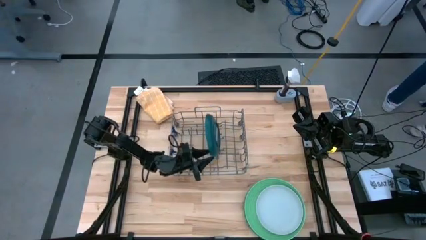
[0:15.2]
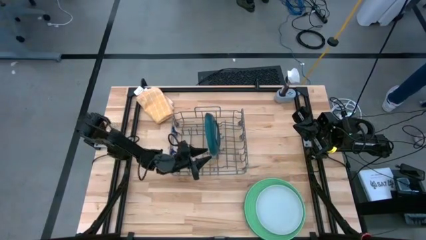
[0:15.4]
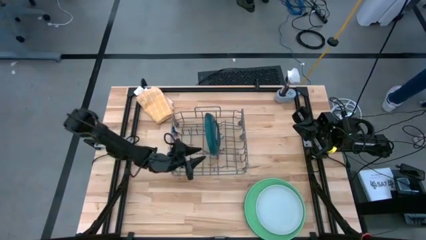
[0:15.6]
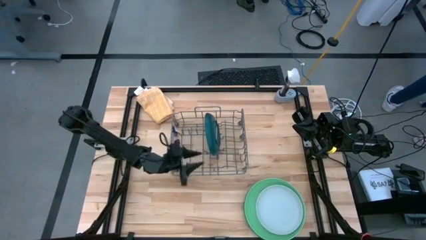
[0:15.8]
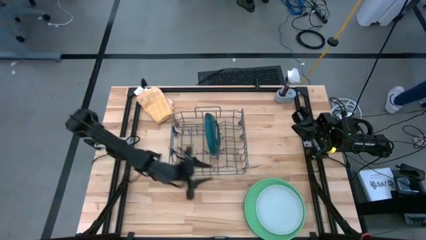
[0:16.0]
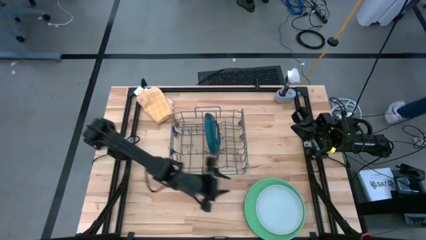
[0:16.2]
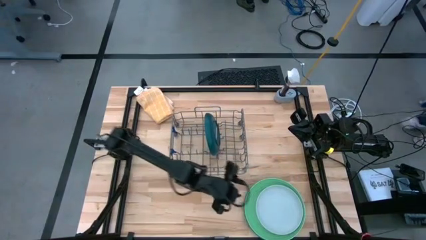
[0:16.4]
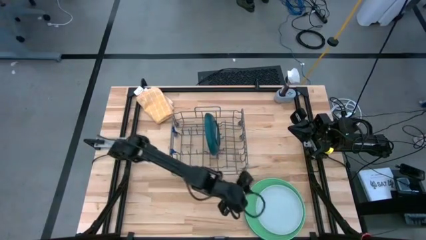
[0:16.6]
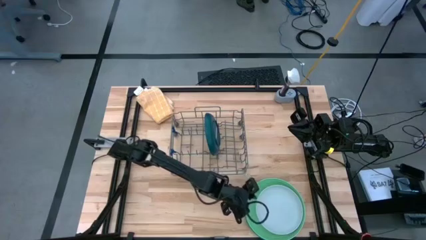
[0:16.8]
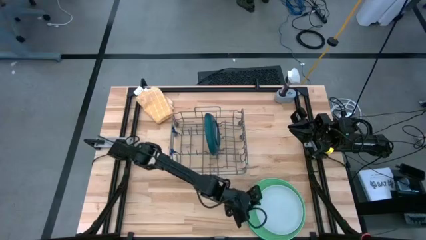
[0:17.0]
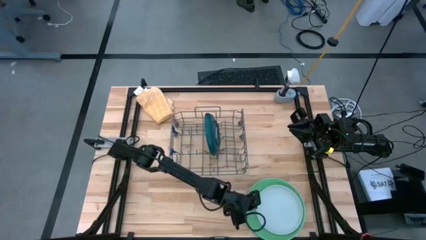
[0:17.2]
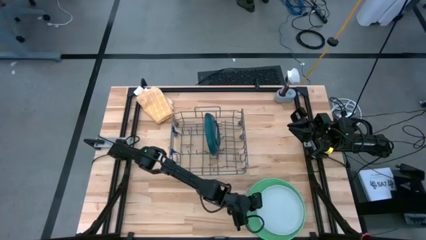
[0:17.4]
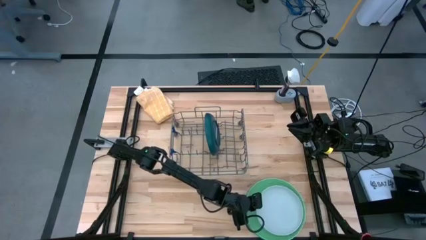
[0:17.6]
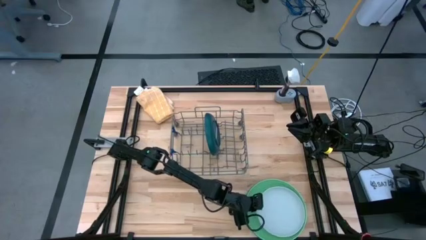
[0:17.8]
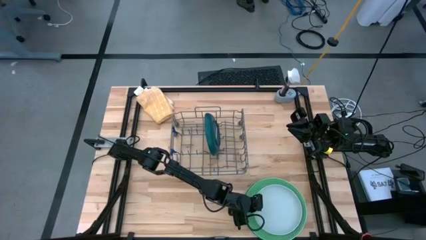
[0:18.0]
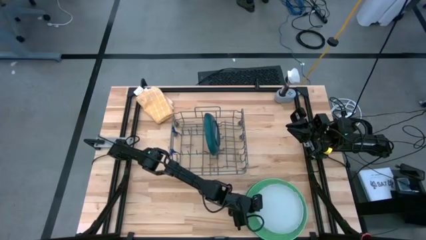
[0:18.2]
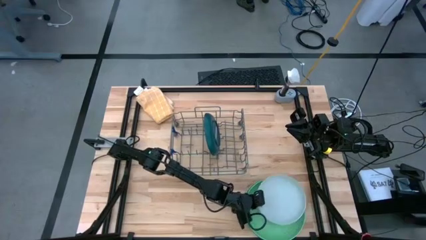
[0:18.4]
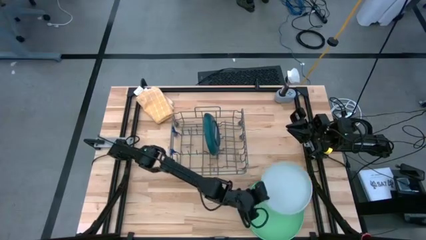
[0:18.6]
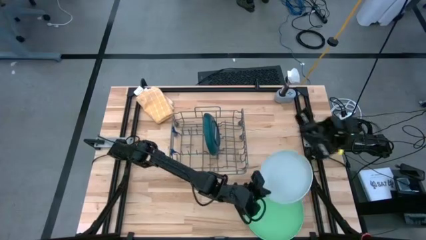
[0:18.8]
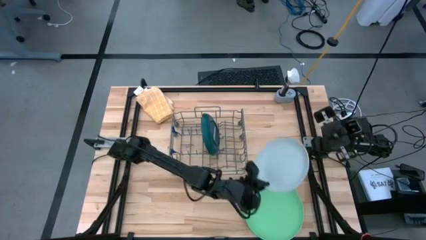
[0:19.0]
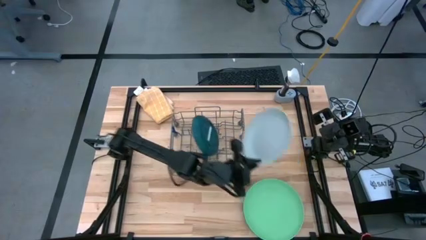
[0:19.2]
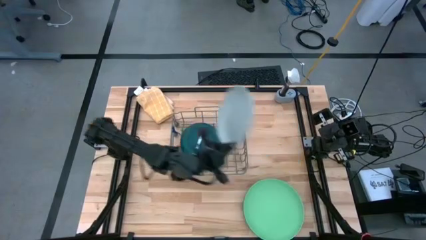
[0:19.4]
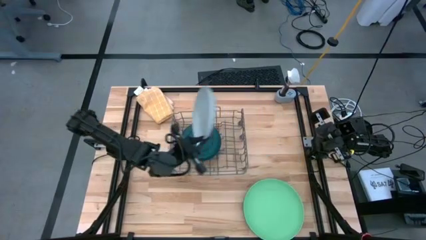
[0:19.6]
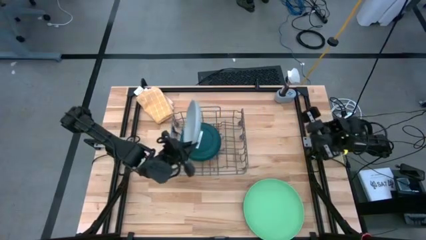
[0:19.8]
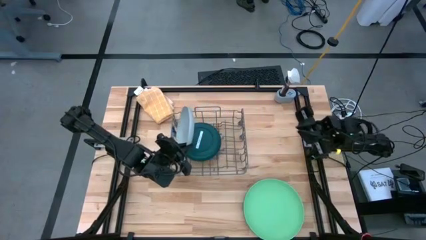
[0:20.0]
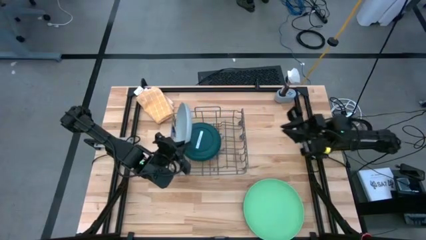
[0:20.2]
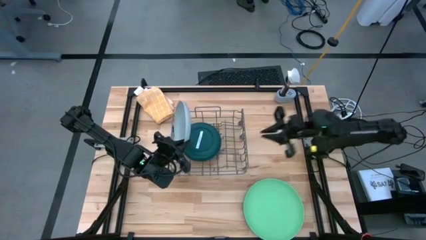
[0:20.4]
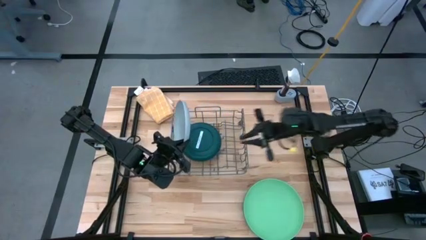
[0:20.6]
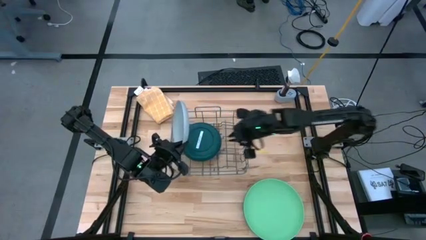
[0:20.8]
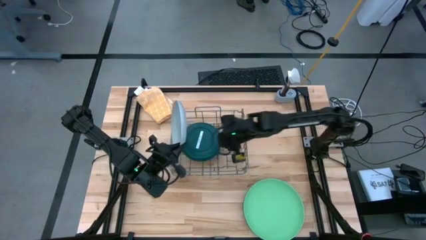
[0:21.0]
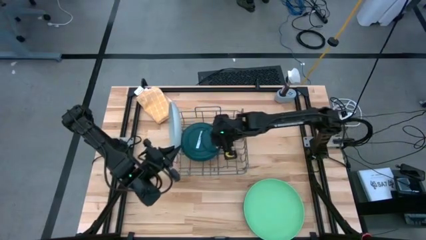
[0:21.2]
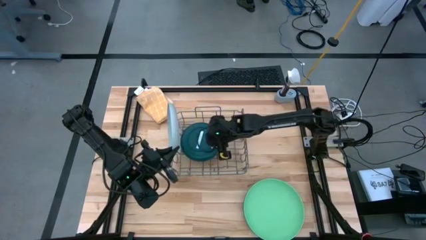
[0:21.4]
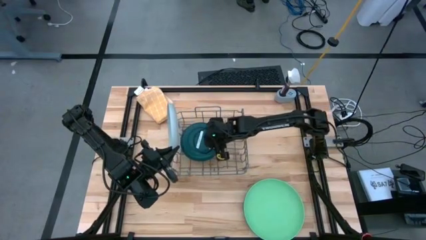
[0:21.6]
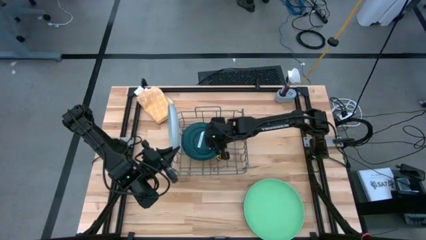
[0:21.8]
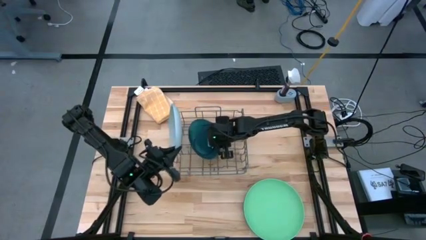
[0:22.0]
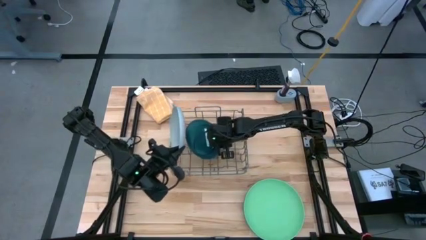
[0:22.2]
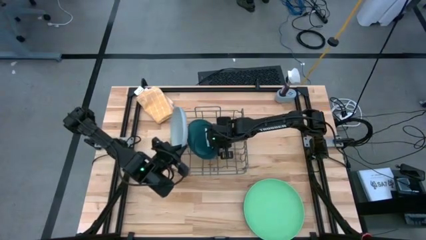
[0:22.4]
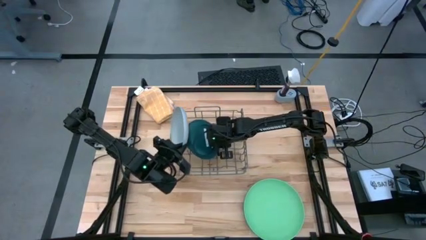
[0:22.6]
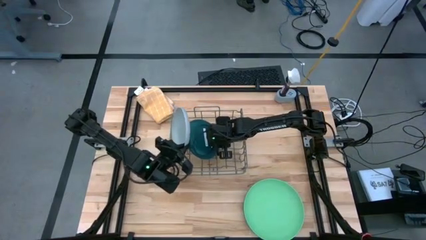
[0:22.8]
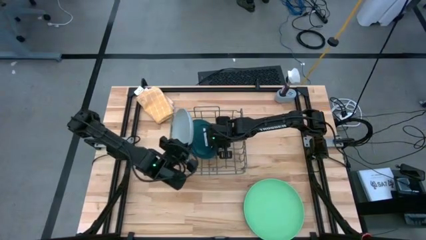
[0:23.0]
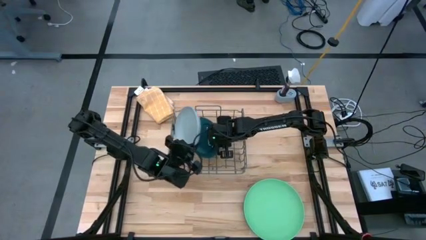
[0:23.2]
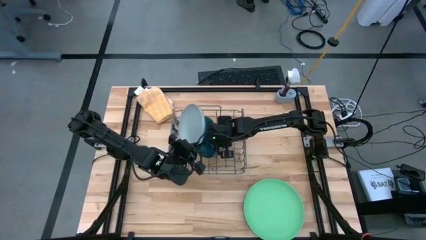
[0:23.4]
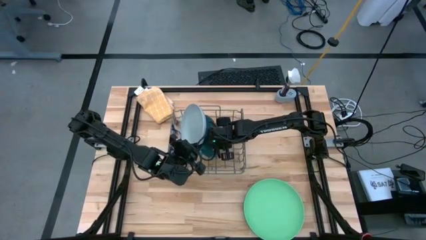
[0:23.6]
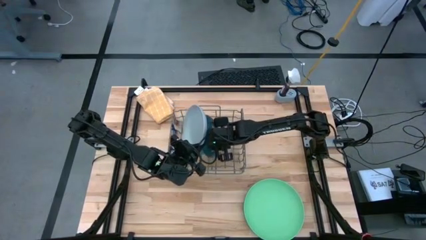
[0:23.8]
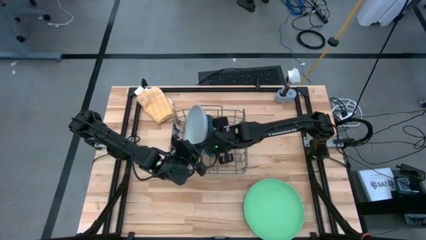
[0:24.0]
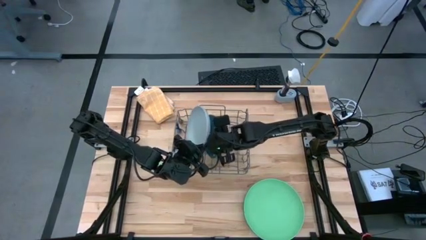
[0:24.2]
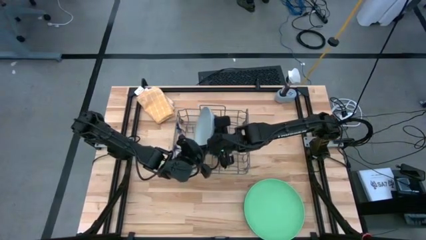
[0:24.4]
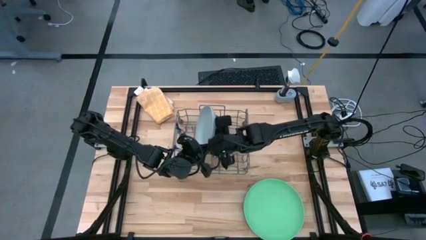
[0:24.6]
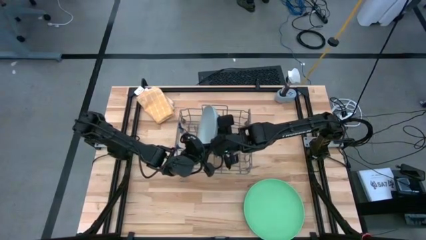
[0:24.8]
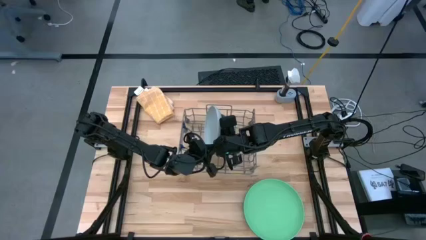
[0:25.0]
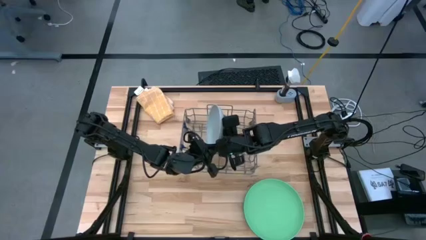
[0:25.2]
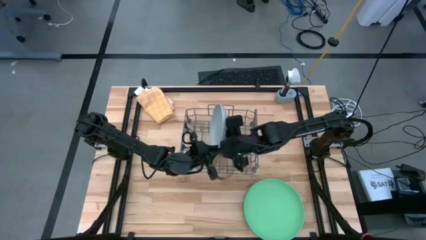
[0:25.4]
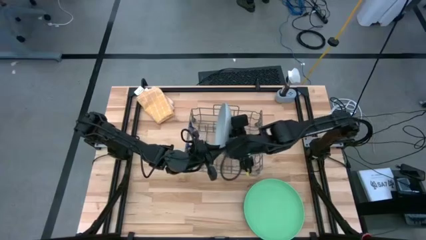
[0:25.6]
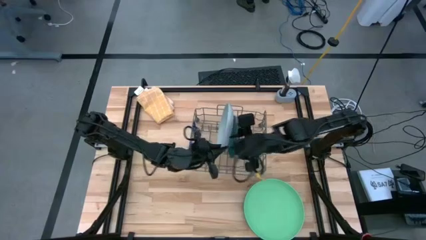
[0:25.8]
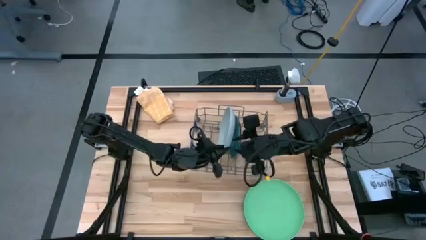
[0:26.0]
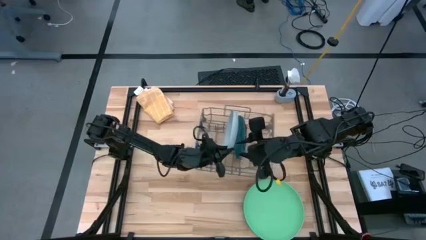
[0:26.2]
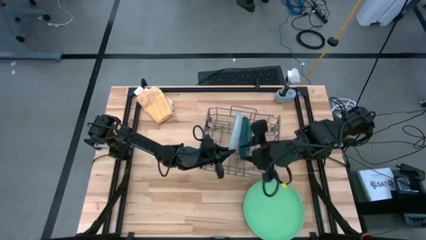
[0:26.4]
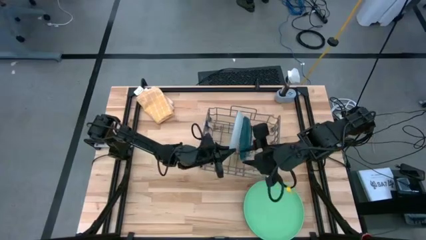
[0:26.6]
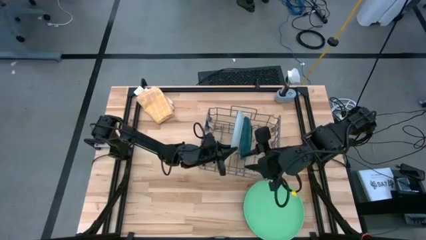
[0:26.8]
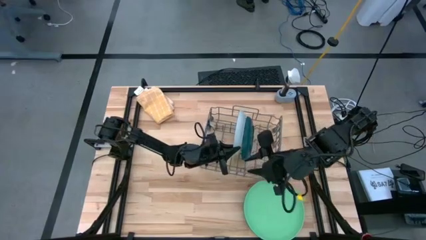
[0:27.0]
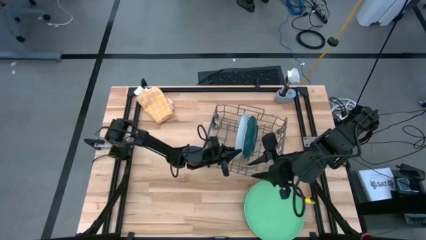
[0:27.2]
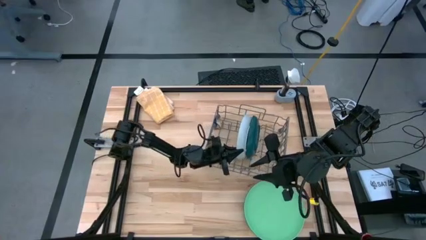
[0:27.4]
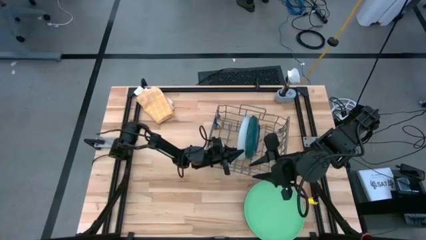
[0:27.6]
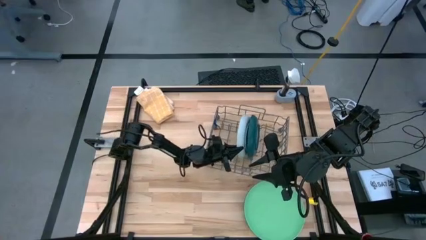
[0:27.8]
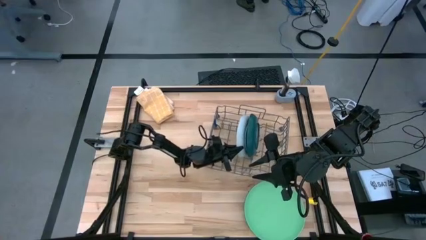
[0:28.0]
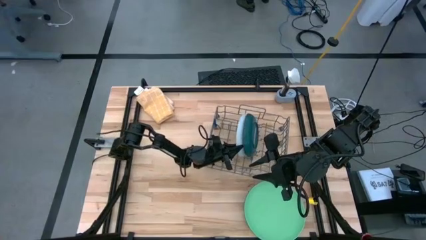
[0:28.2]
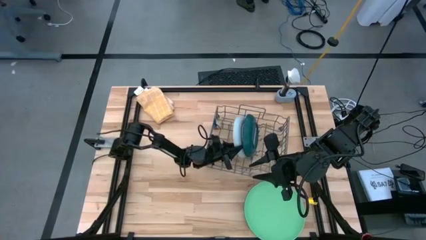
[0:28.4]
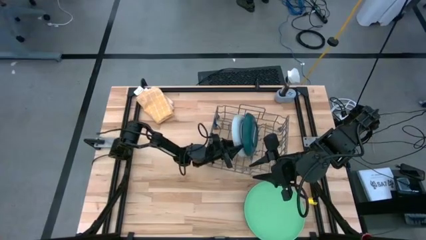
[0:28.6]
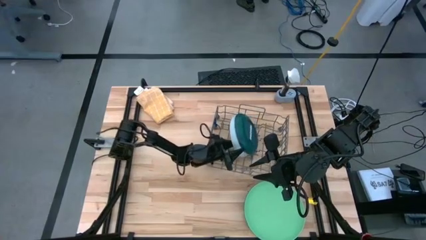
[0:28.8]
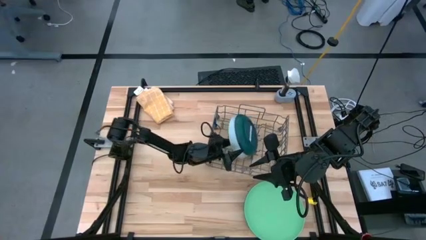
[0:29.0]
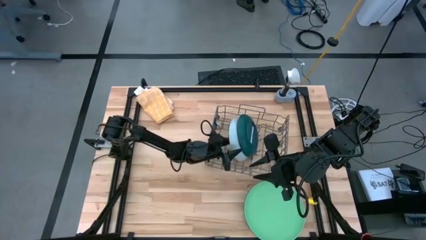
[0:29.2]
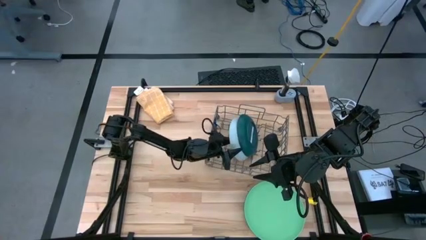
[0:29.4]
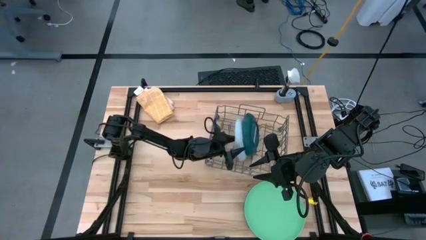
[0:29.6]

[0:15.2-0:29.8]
Task: Sort dishes
Put the white plate in the dish rack

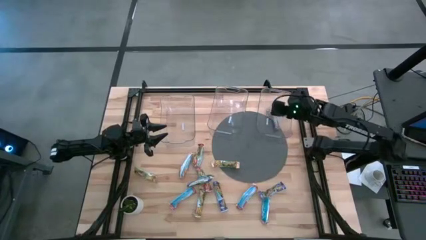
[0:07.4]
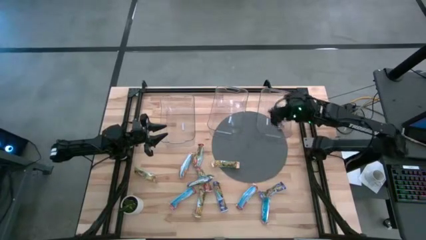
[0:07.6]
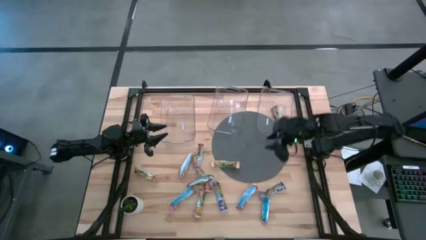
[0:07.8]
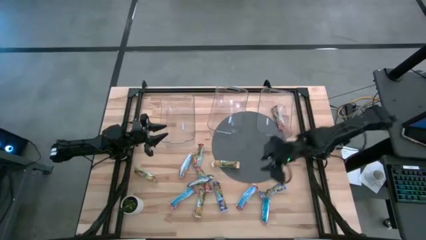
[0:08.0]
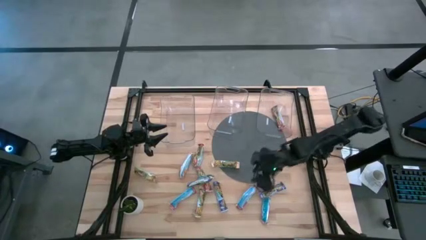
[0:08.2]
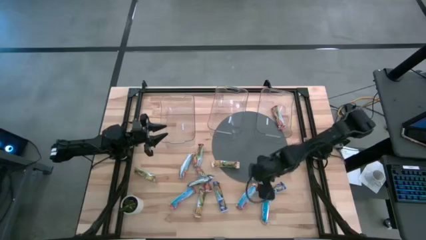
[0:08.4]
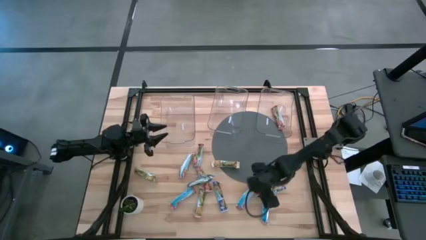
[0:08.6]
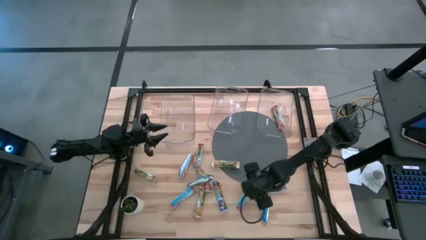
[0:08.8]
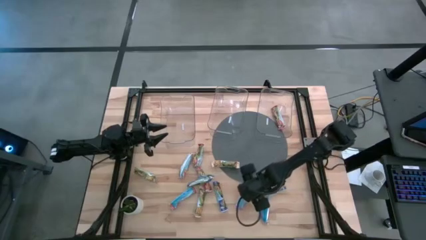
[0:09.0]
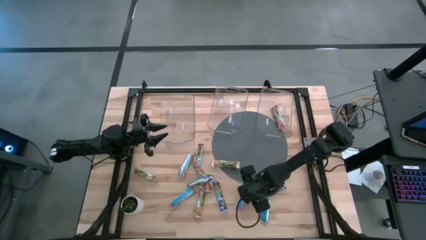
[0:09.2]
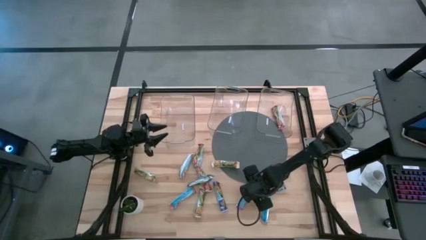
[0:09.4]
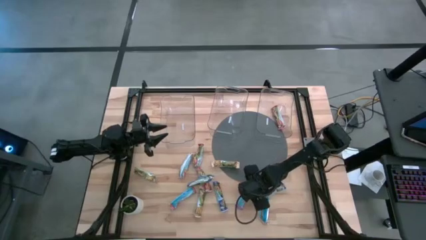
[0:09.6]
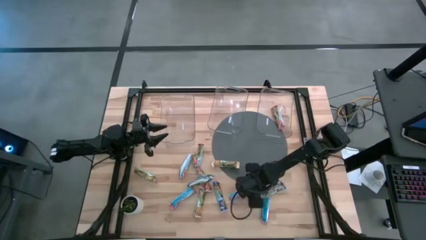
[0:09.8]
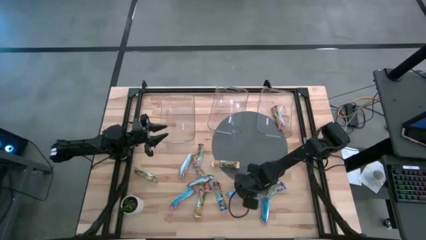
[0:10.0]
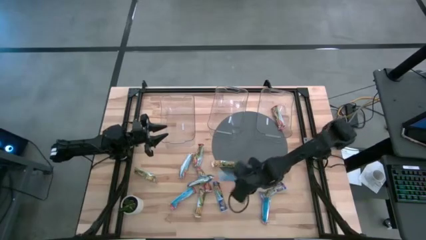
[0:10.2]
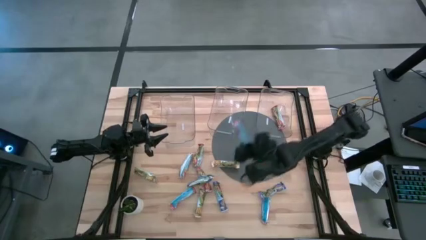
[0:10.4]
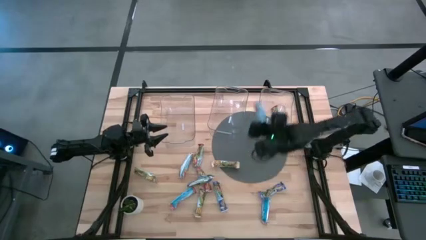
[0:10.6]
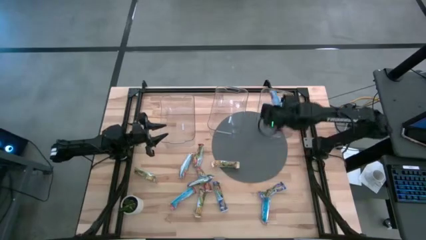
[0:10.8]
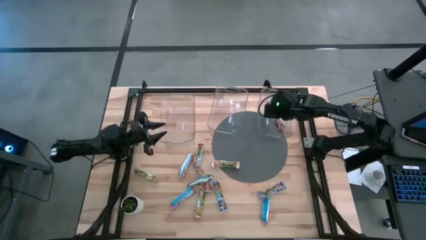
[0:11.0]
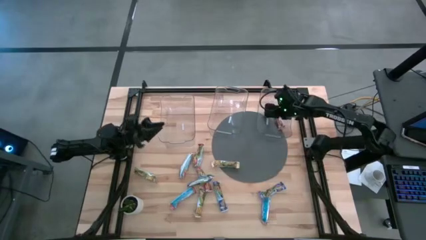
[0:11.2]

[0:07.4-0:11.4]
Task: Pick and place Granola Bars by type
Put the red granola bar into the right transparent bin
